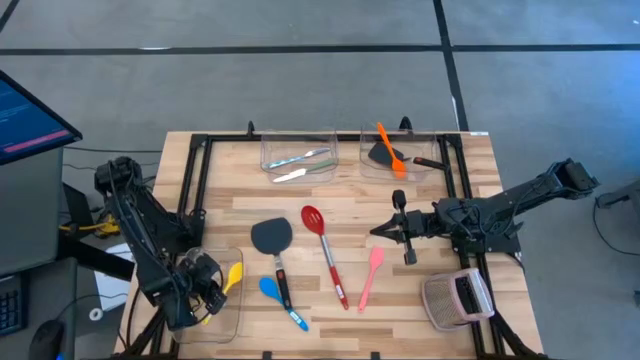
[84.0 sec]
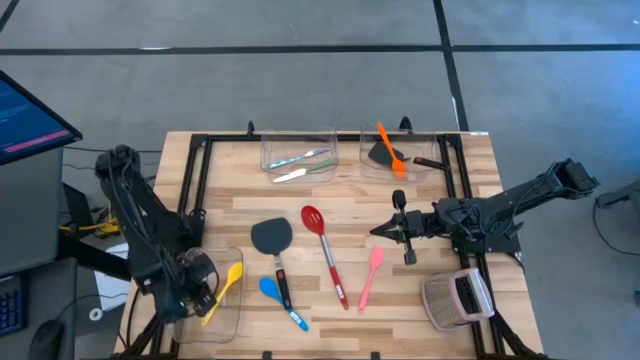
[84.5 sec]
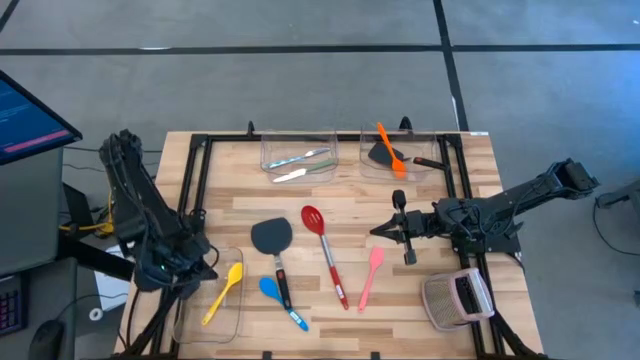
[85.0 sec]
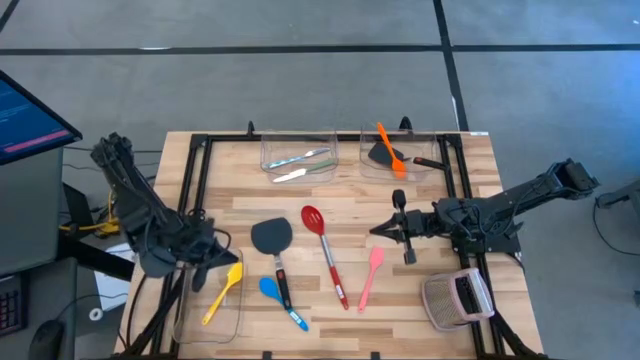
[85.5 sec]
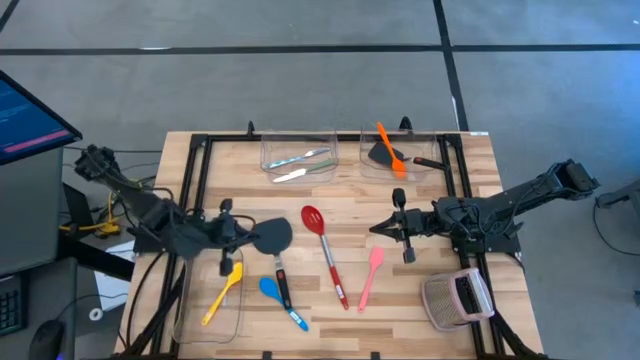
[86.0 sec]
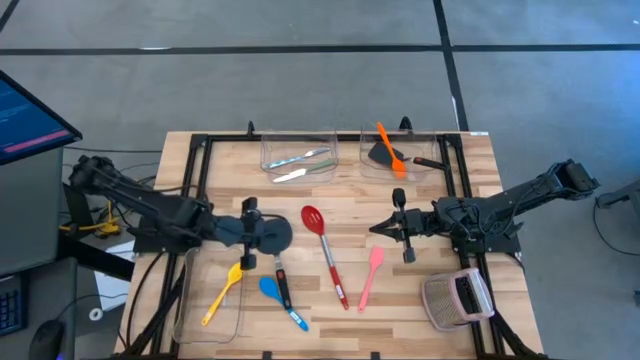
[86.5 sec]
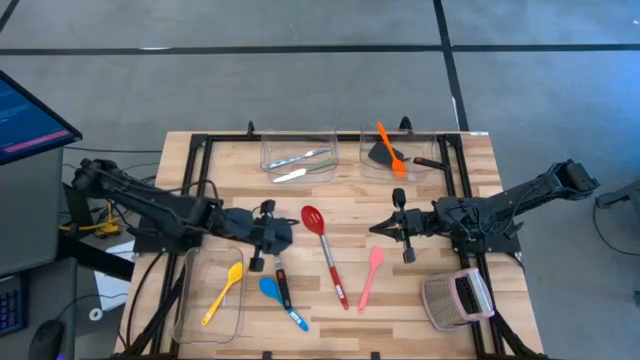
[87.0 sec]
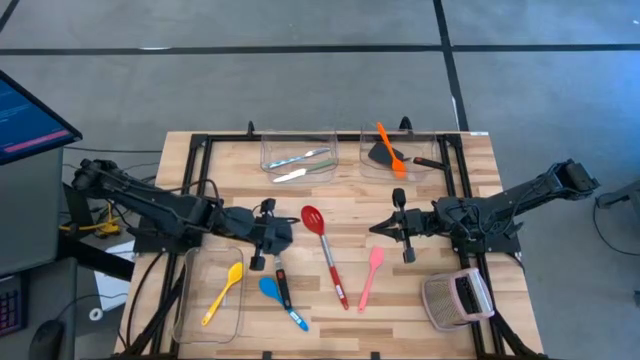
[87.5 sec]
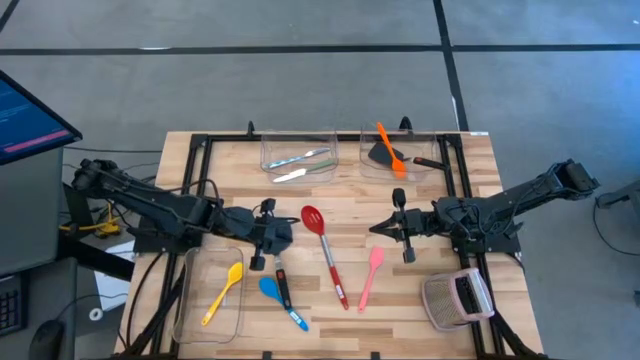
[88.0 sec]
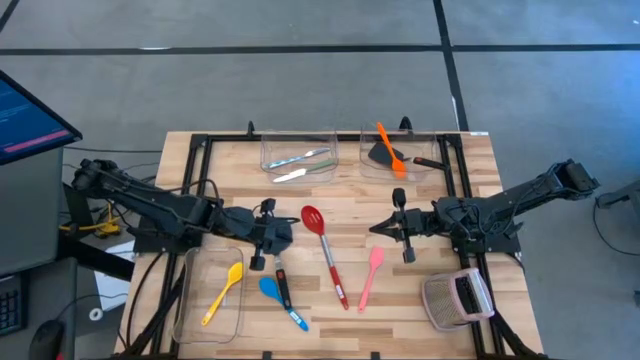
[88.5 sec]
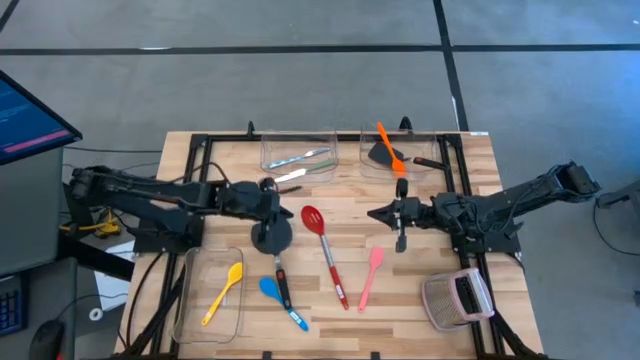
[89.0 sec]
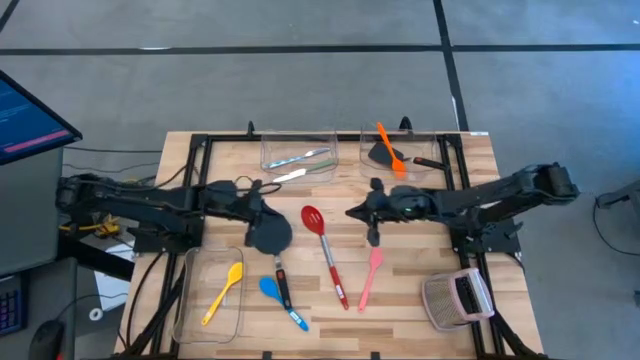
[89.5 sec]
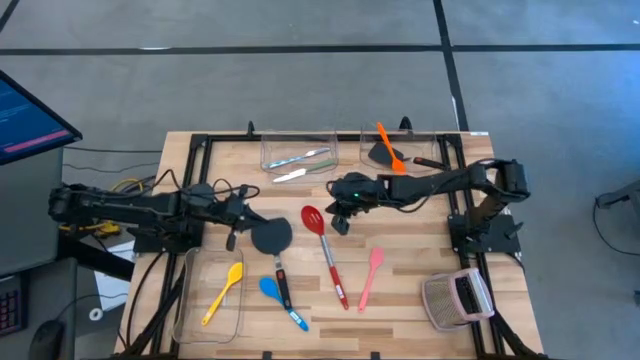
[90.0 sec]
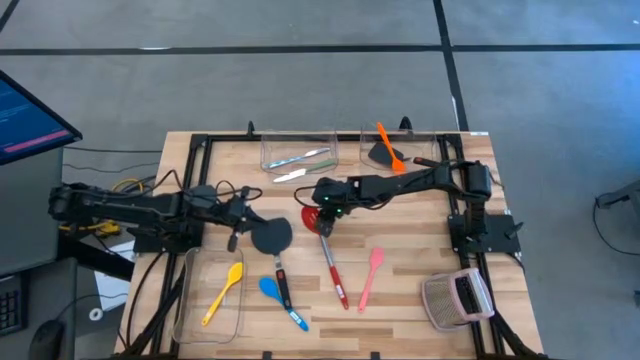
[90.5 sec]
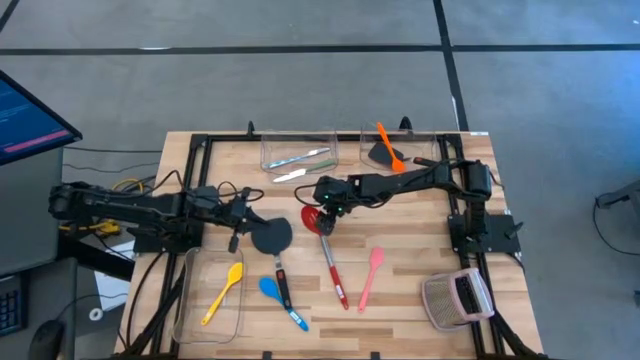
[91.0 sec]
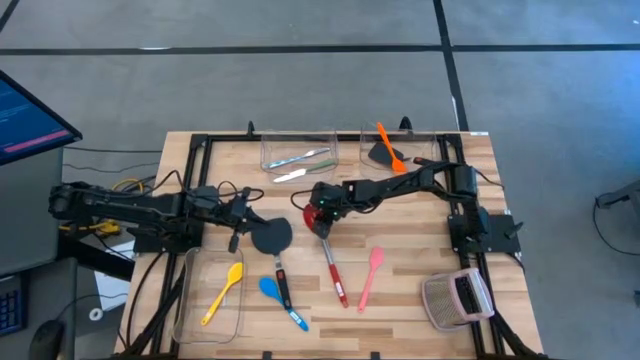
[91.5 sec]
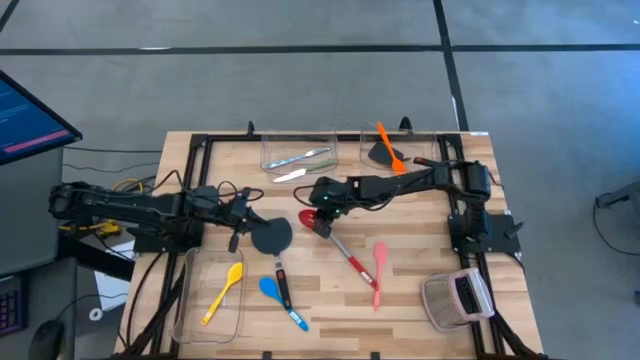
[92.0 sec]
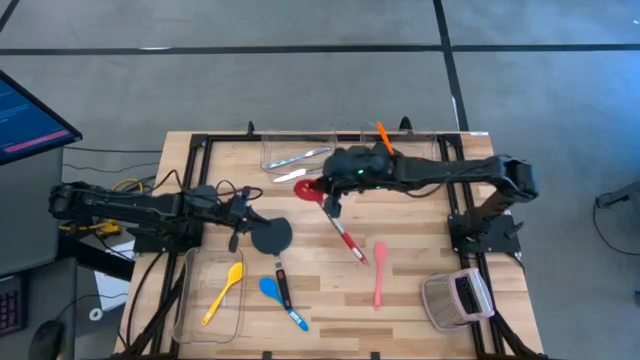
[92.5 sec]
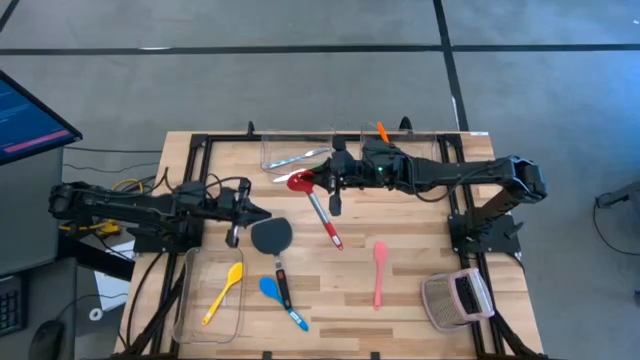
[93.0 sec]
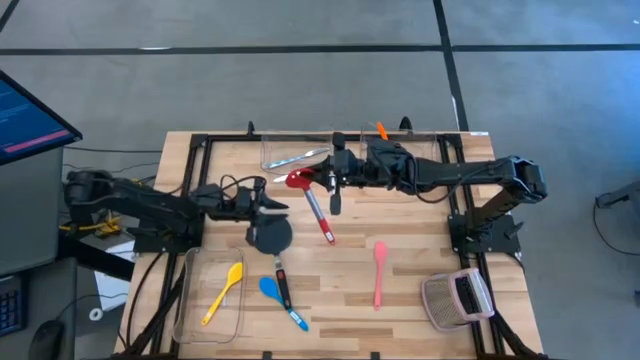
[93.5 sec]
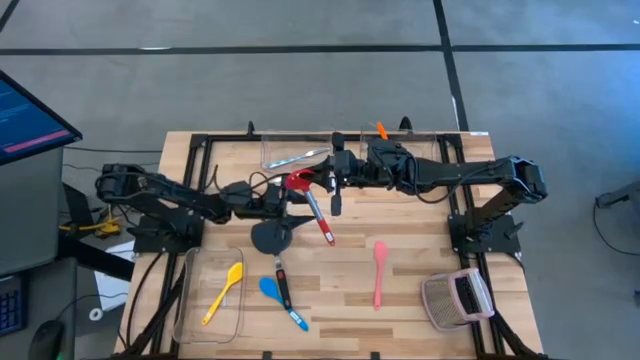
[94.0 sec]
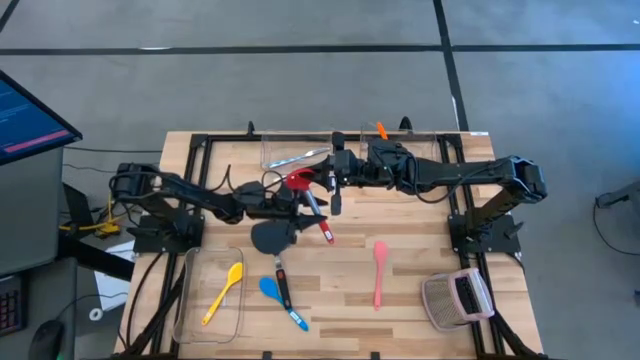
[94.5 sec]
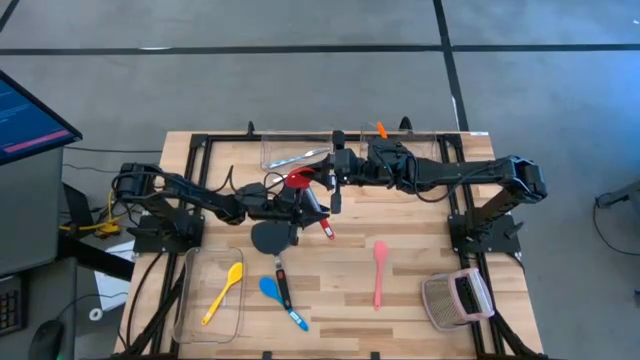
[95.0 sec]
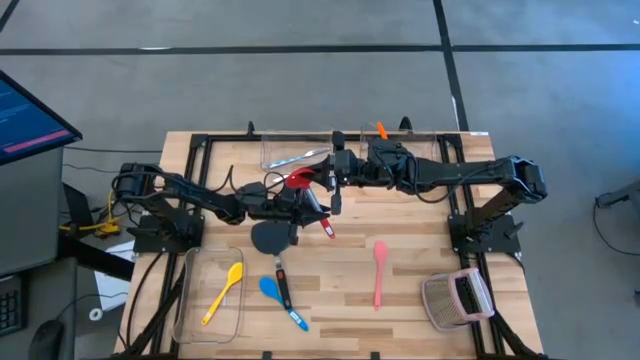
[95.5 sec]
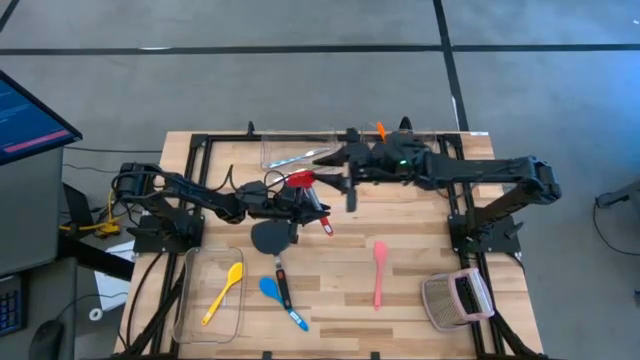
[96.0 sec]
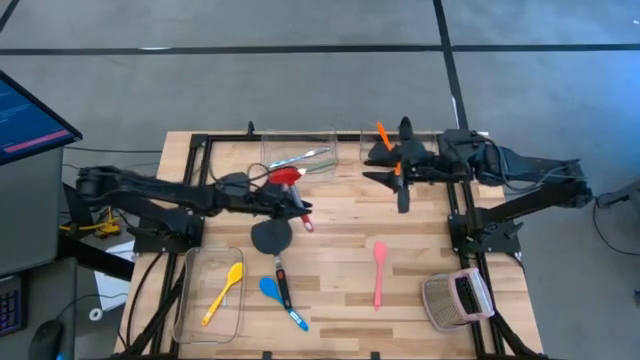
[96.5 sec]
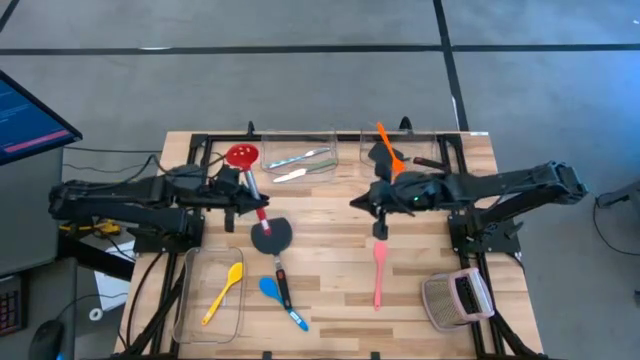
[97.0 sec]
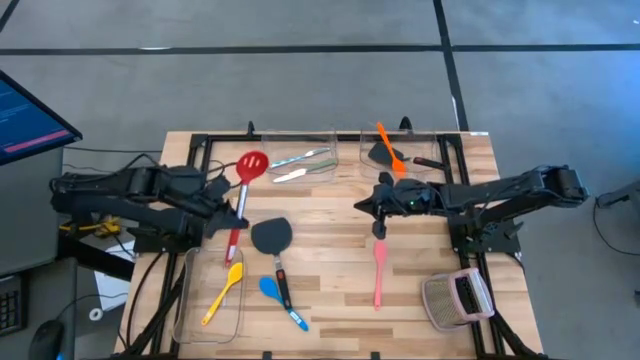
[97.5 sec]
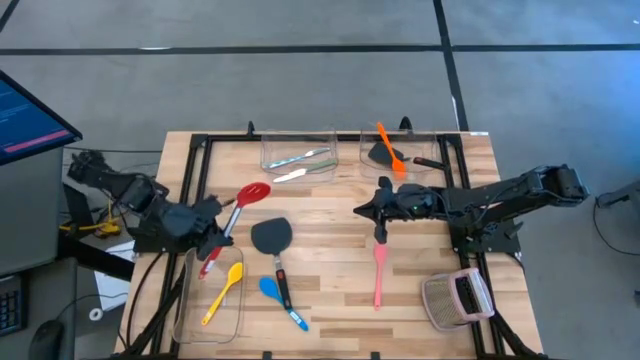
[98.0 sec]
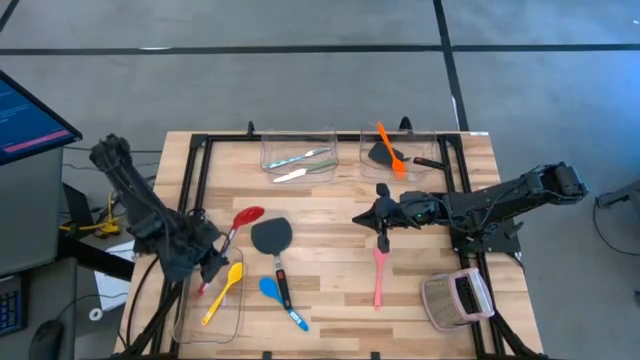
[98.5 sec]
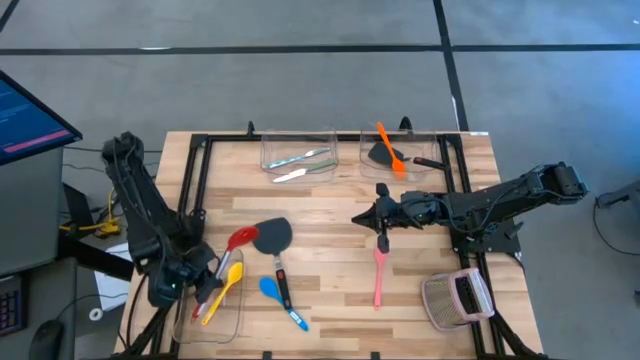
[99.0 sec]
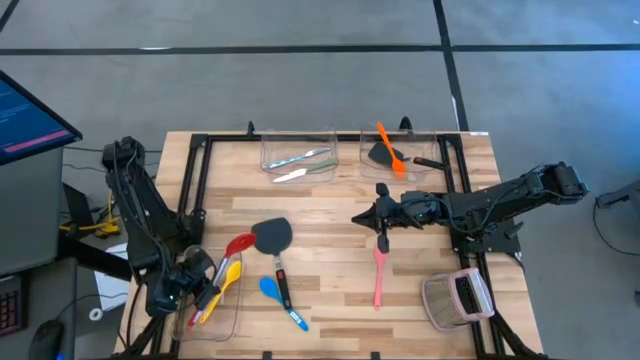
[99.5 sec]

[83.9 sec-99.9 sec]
Task: Pick & Place Kitchen Items
Put the red serving spoon into the bottom transparent bin

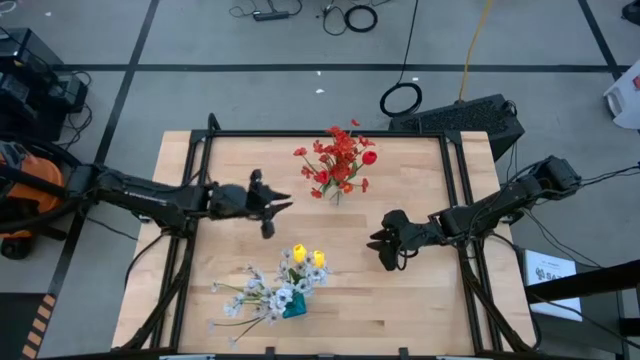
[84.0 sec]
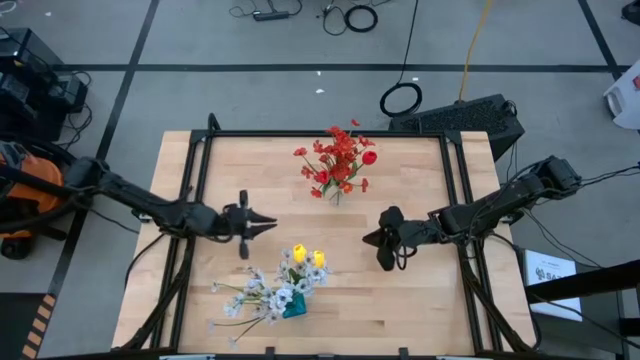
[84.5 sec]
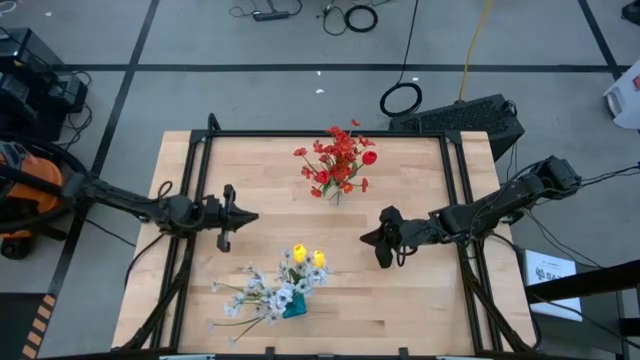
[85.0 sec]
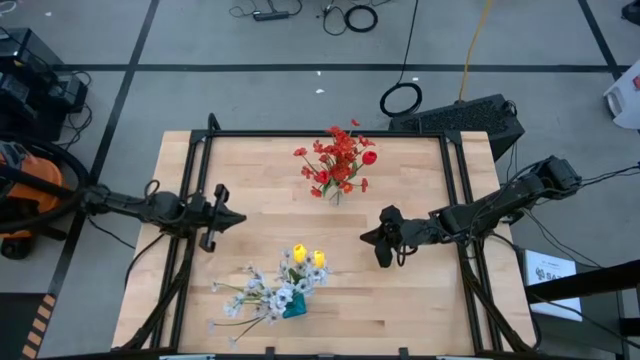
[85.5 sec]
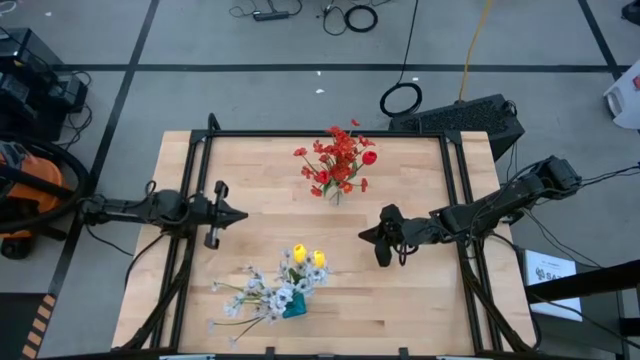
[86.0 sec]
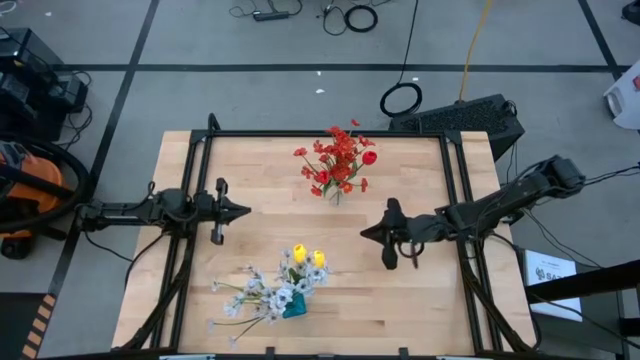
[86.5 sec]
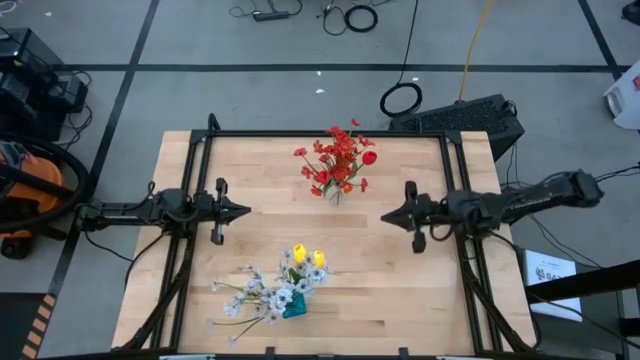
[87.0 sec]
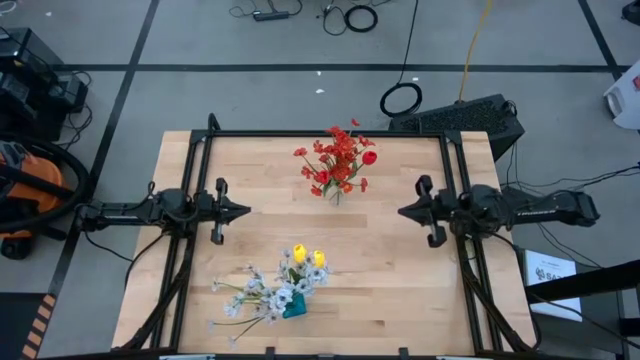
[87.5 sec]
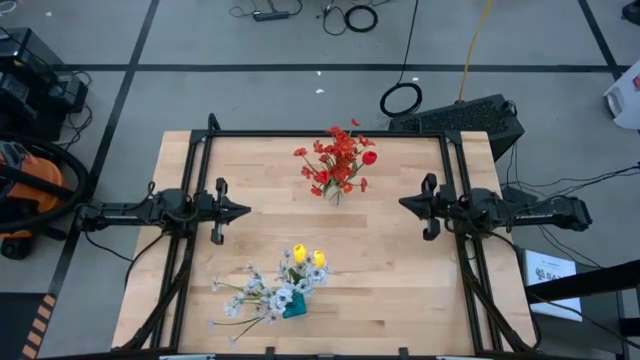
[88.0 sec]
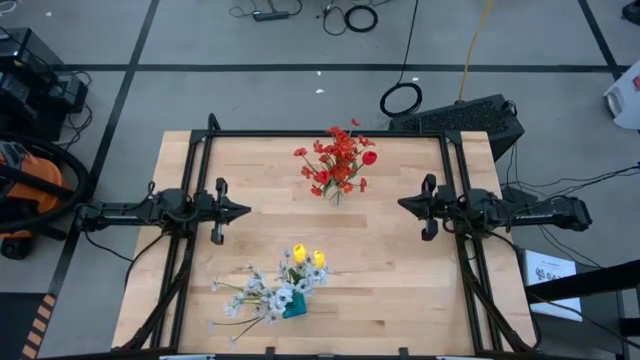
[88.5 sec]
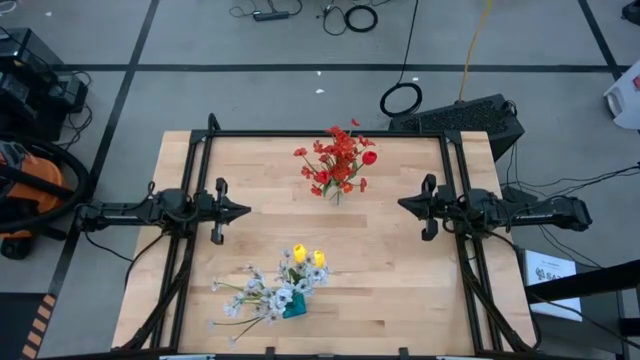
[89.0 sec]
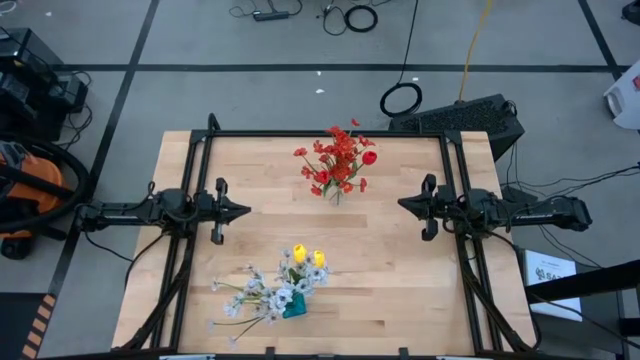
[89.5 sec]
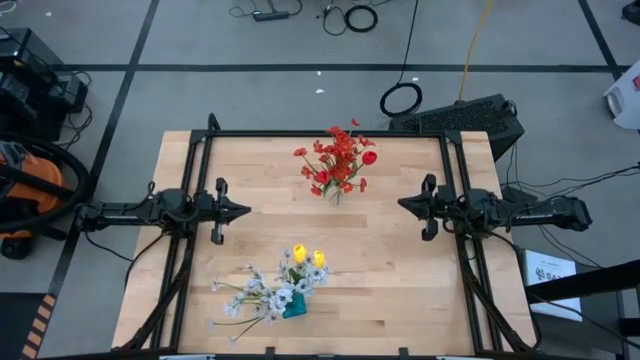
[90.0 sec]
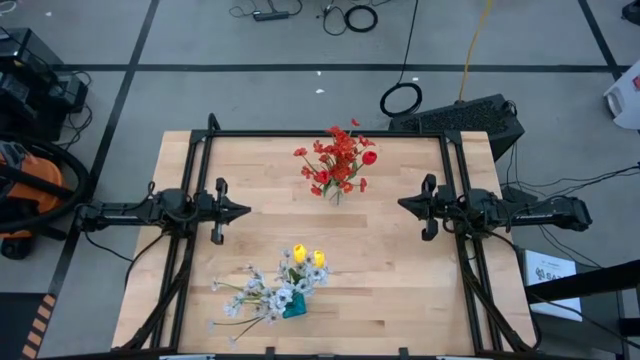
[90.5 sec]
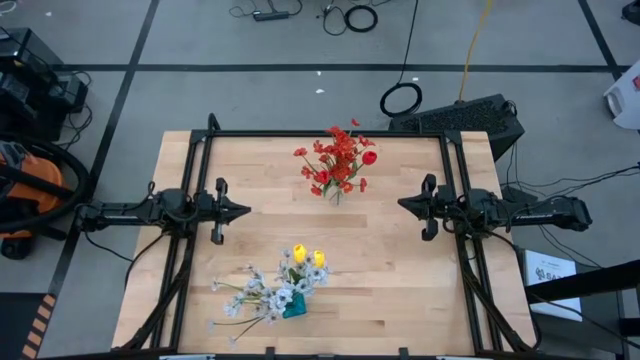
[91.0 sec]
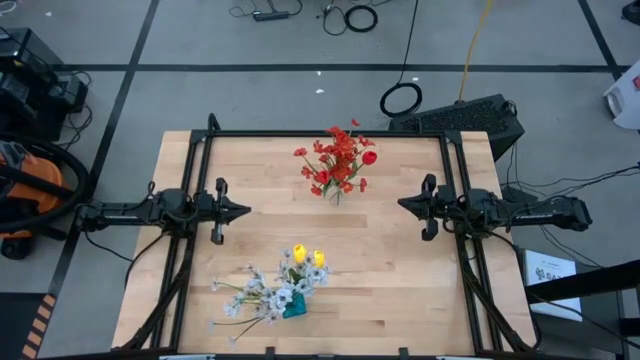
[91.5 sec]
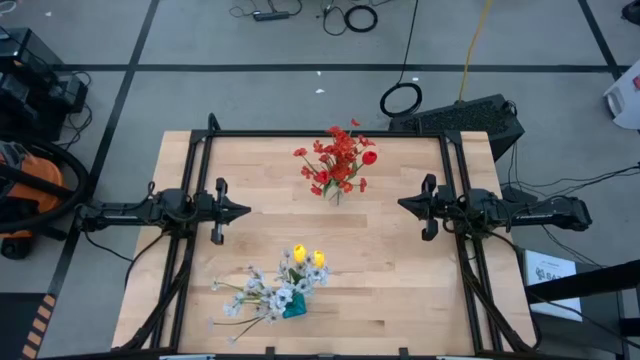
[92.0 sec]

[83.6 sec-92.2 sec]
Task: Sort flowers into vase by color
Return to Home Position
